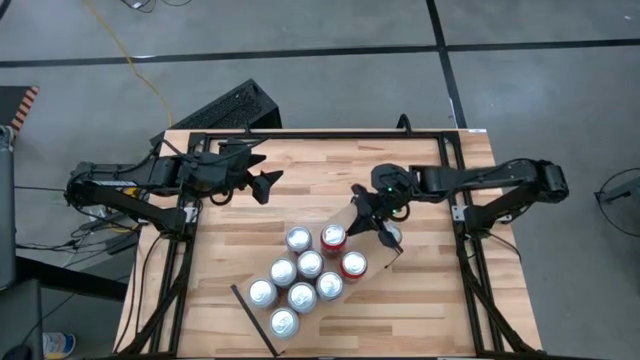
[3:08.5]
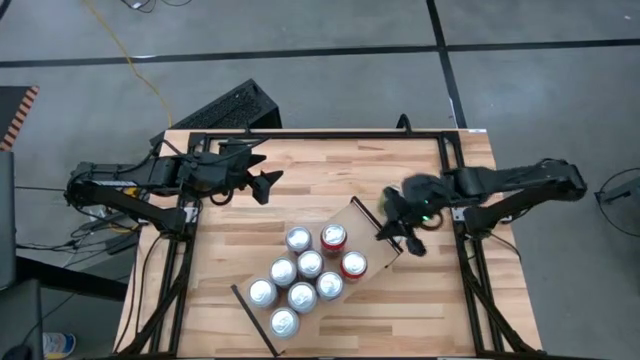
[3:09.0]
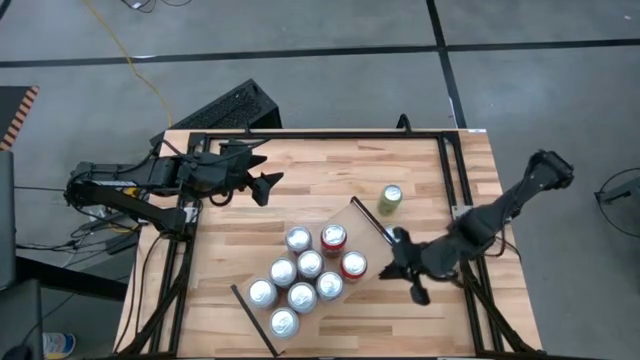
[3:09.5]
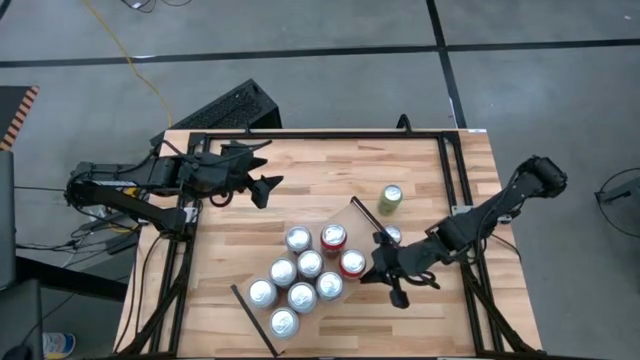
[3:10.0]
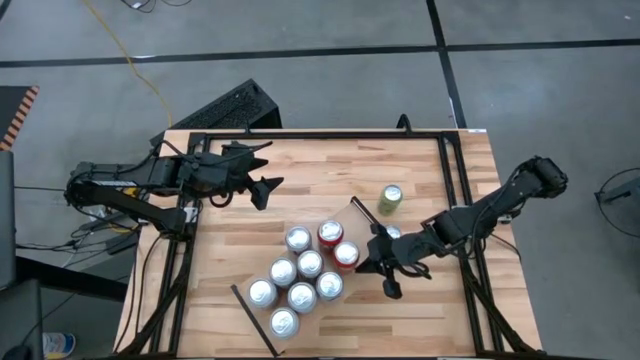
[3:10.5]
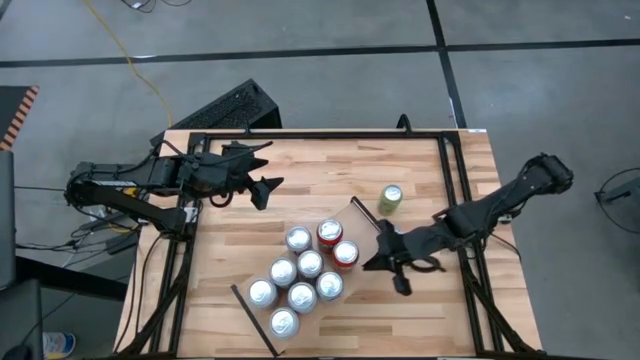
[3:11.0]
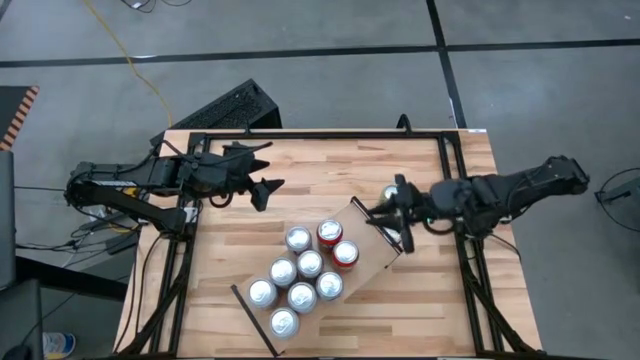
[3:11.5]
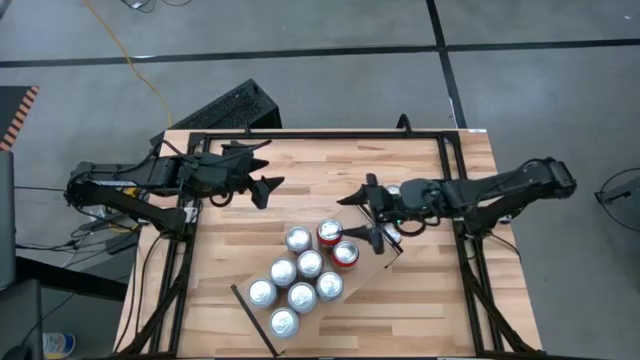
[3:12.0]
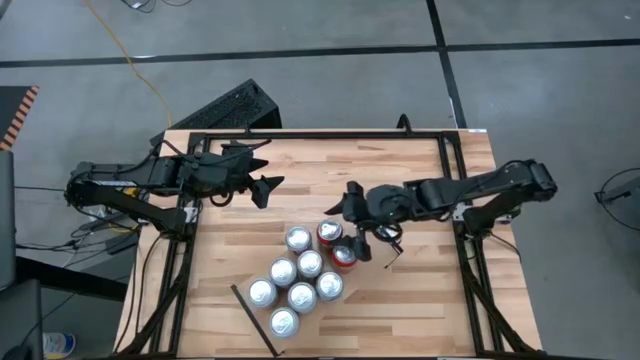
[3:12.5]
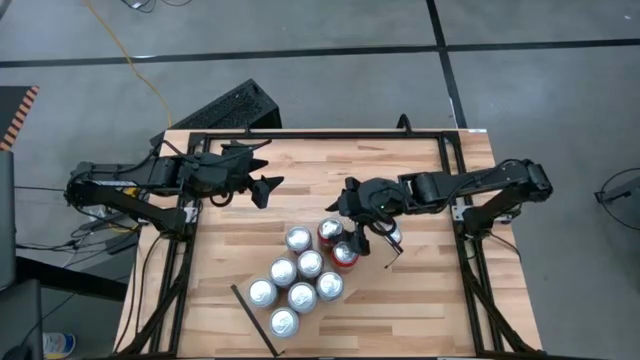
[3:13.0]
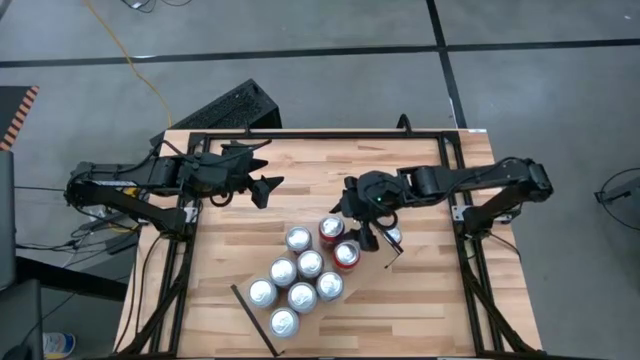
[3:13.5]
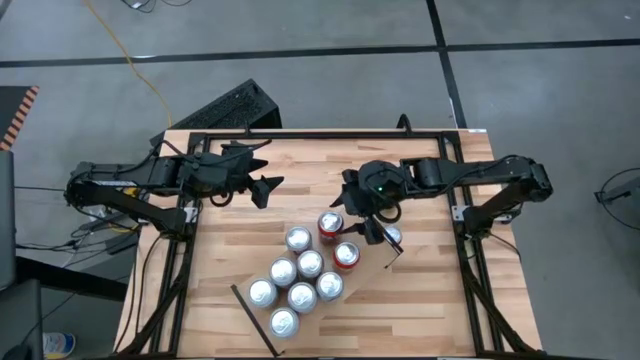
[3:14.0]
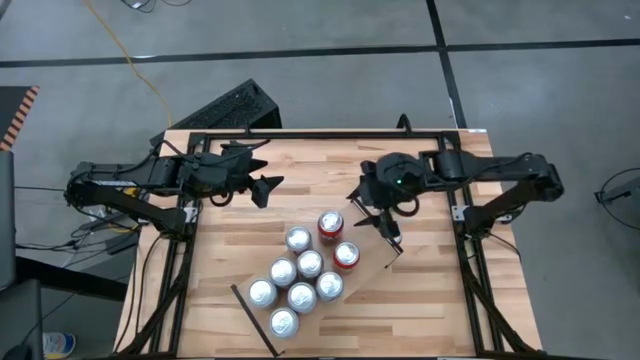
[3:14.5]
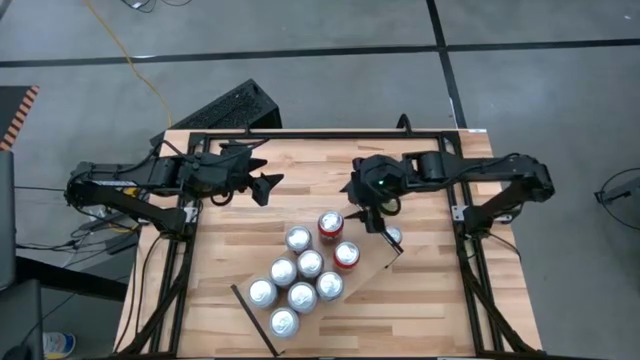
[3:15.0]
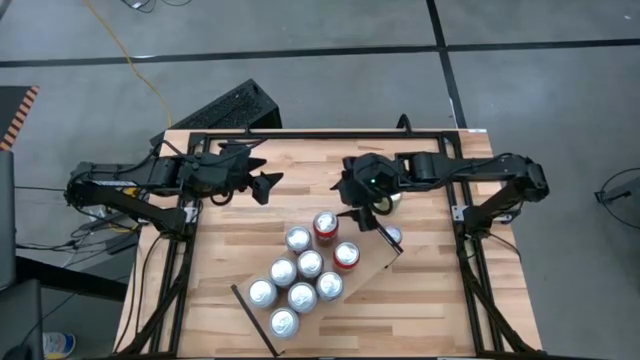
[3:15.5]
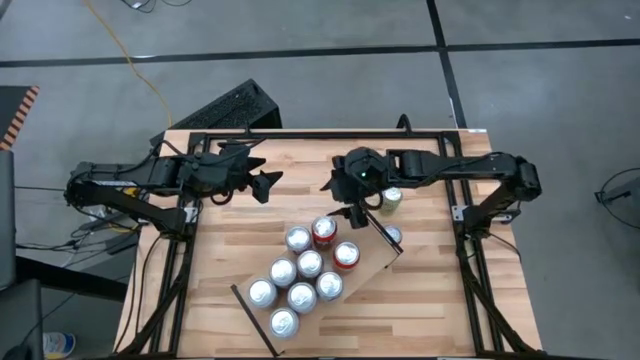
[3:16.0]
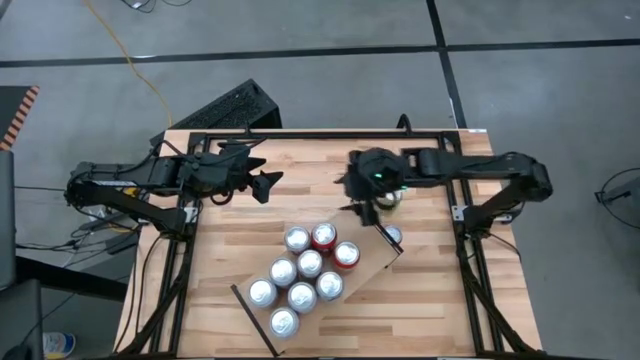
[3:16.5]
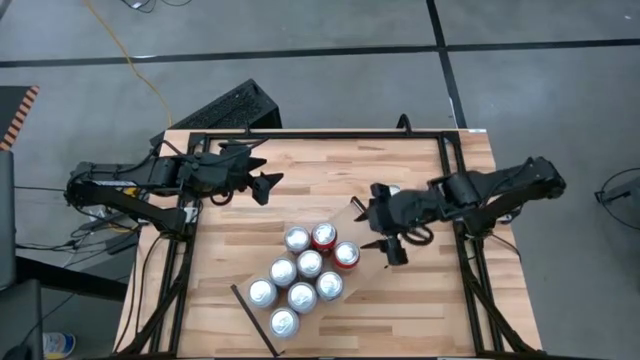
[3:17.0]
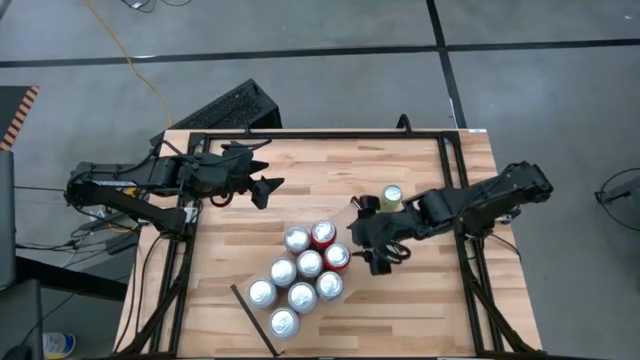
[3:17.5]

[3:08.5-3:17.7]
Task: Place canned beverage on shelf
Adjust the red soda cans on the shelf

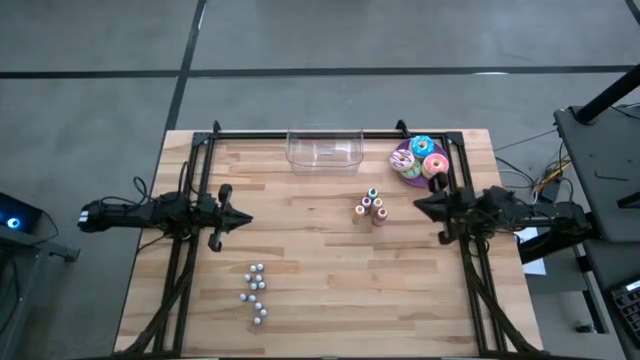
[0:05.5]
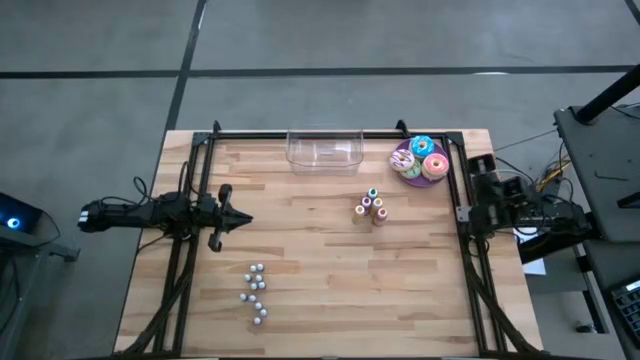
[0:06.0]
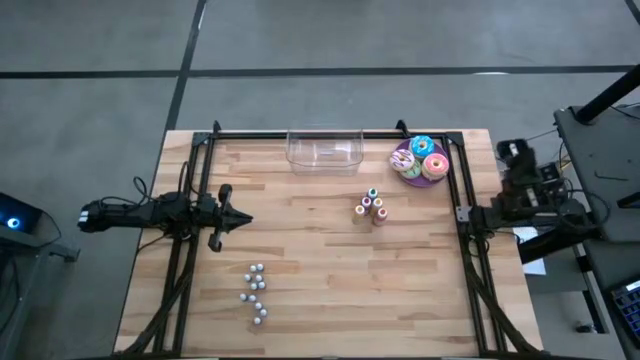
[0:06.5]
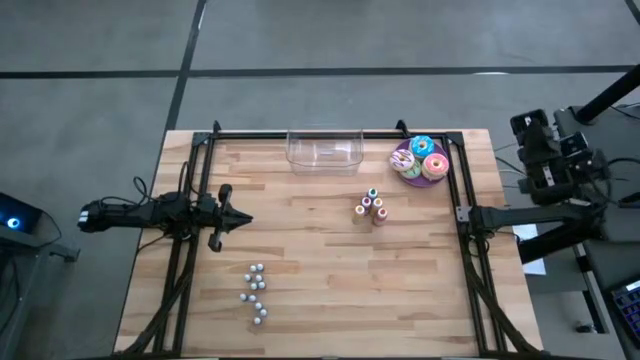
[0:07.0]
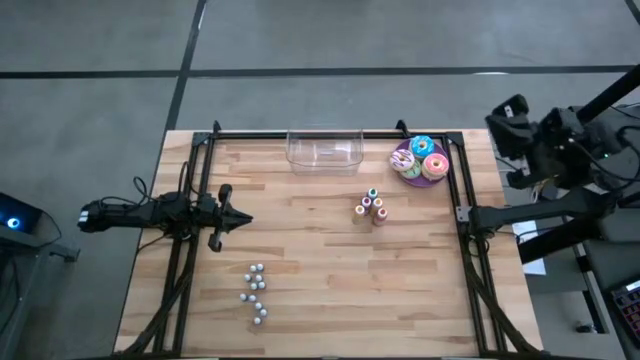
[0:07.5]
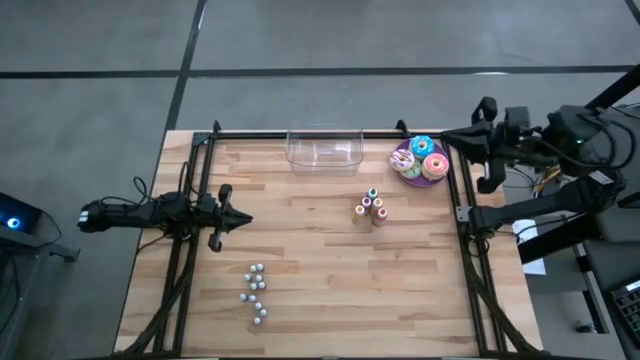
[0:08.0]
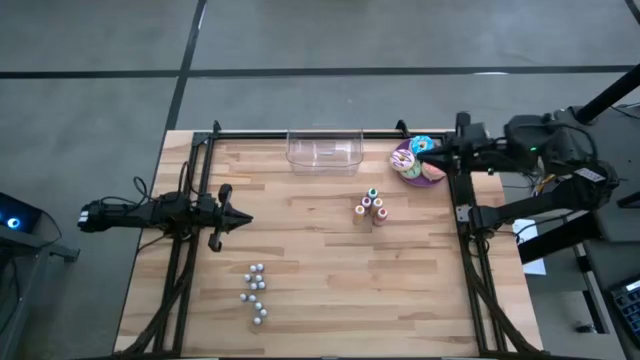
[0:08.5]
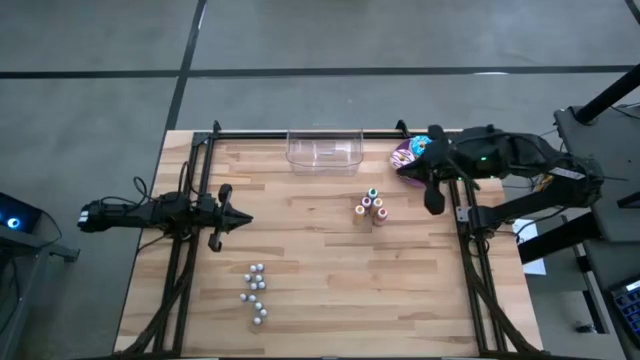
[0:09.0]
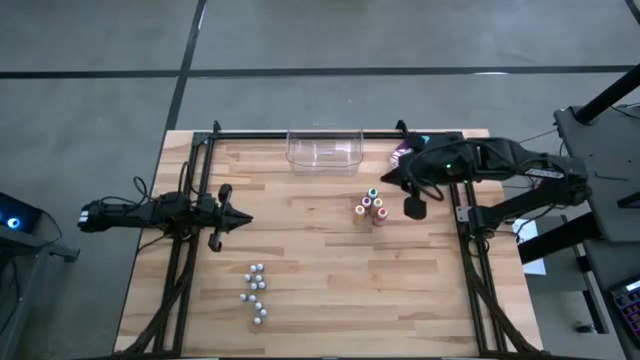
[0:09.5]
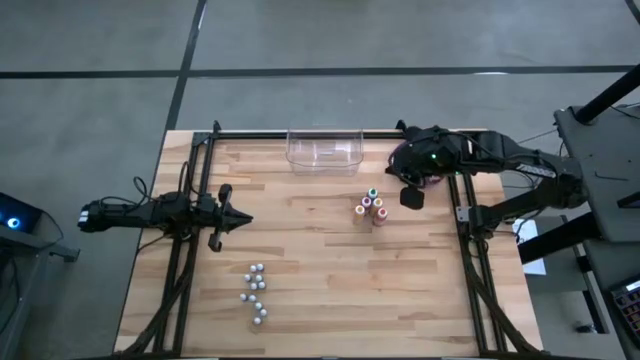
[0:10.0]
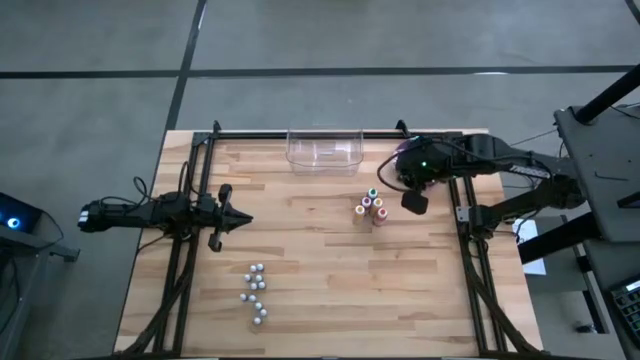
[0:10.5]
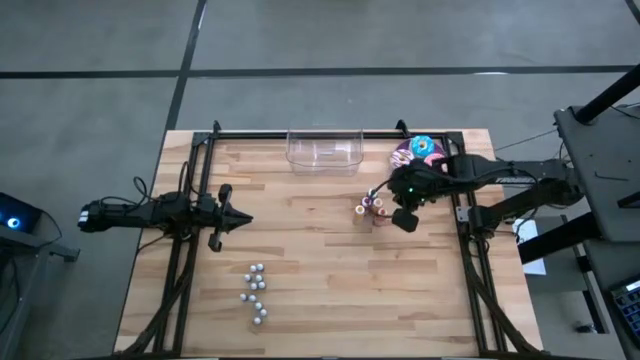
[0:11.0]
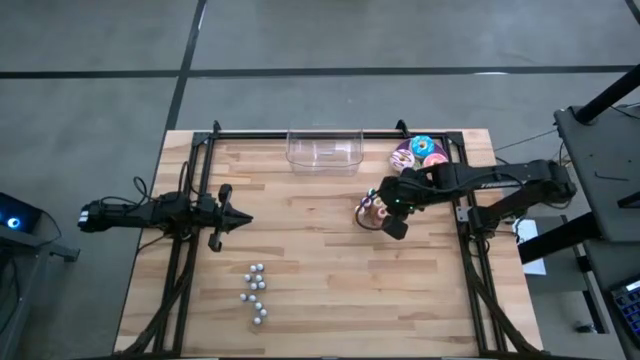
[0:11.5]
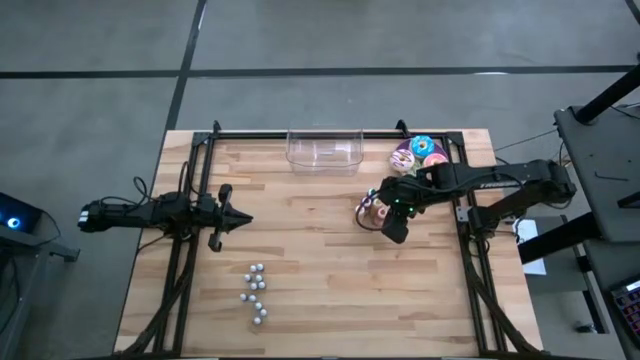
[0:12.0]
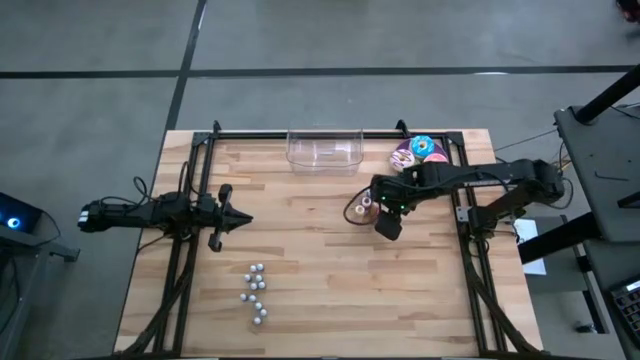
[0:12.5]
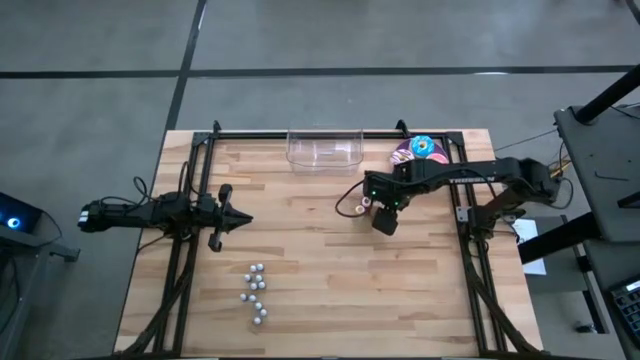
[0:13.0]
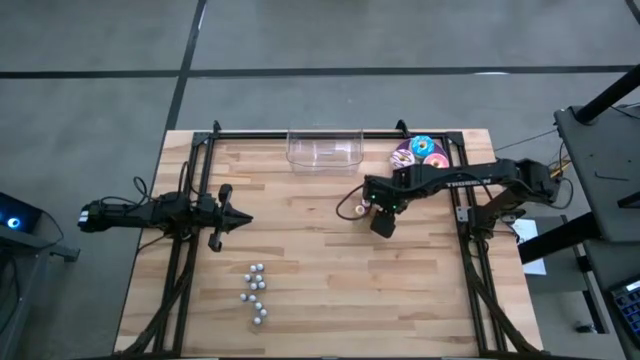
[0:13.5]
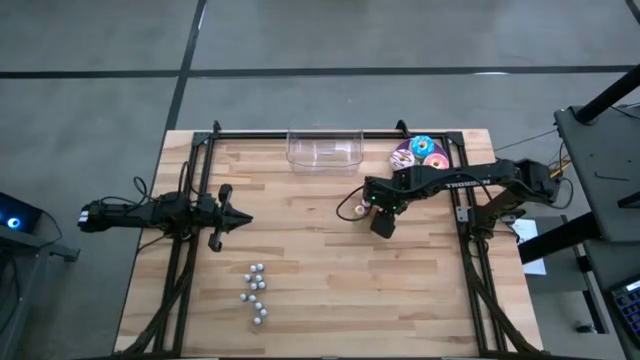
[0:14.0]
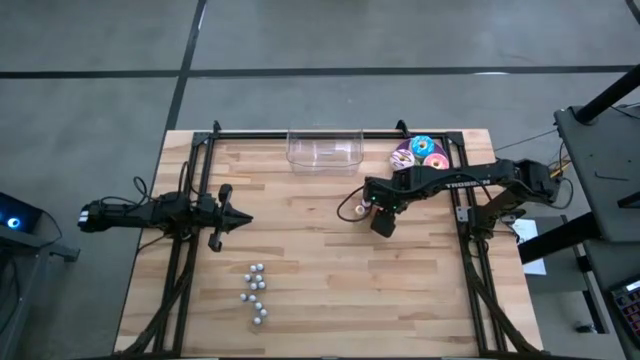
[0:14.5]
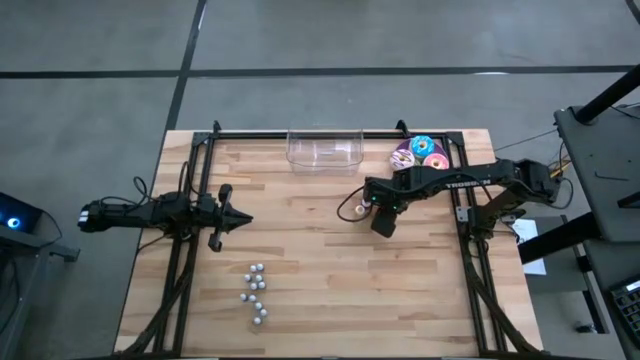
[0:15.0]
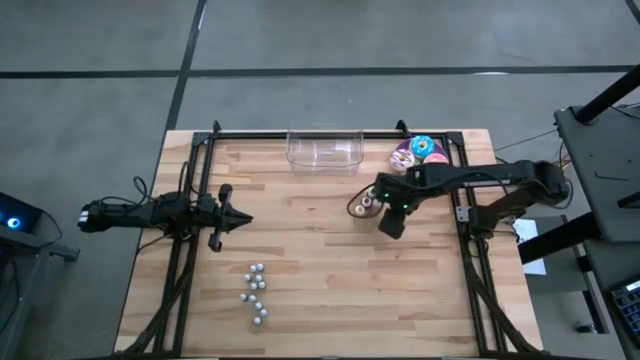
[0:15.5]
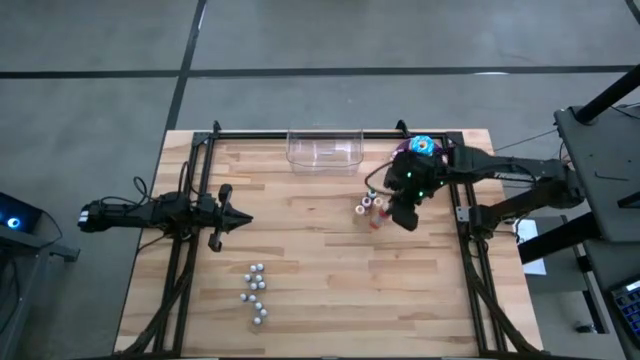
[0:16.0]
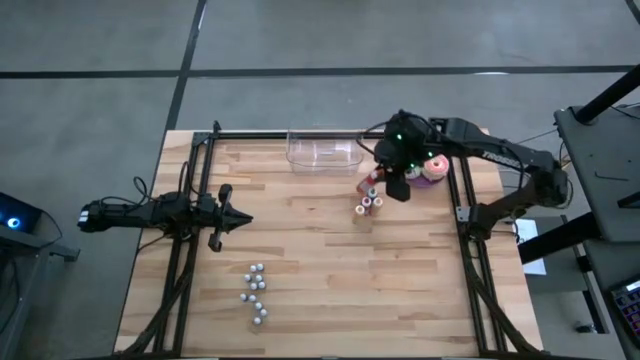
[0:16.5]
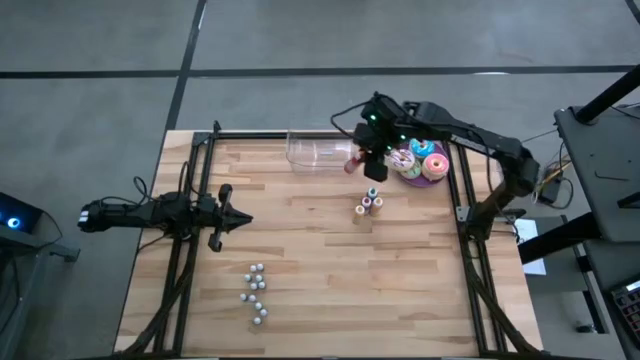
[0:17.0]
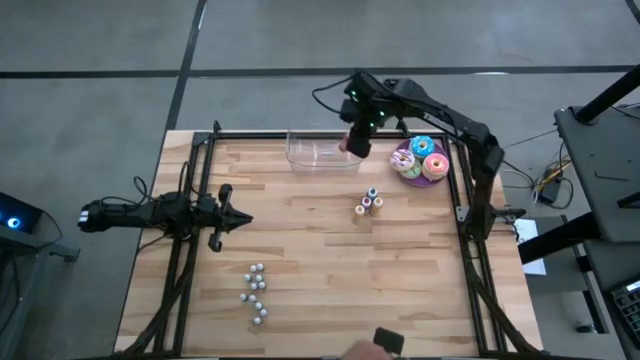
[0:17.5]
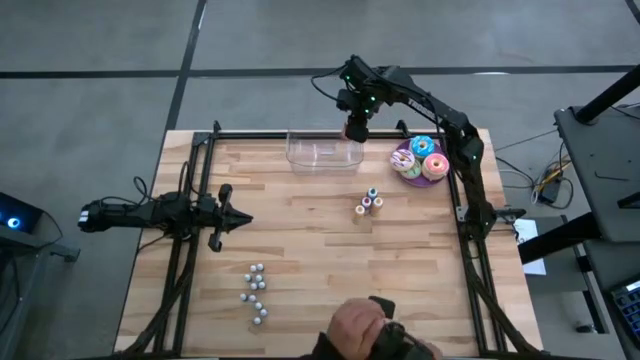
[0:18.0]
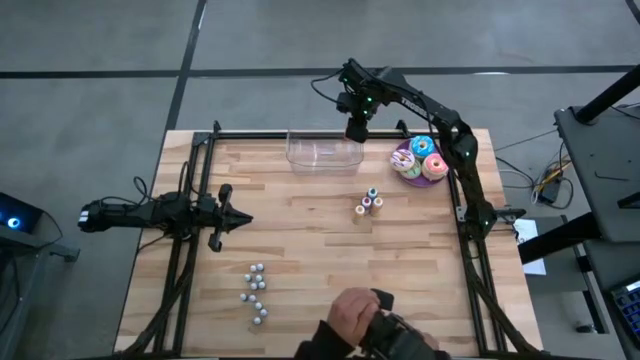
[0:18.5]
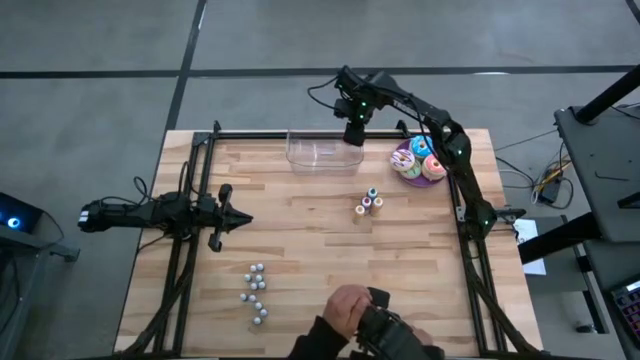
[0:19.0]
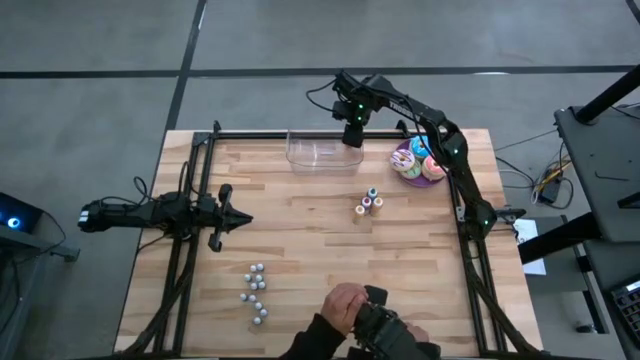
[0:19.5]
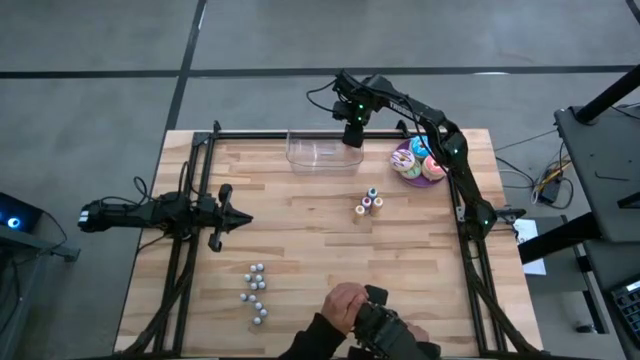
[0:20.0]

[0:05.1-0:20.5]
Task: Pick & Place food coloring
Put the large orange food coloring bottle into the transparent bin
